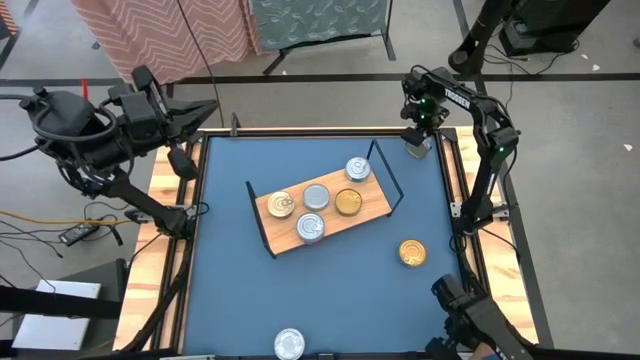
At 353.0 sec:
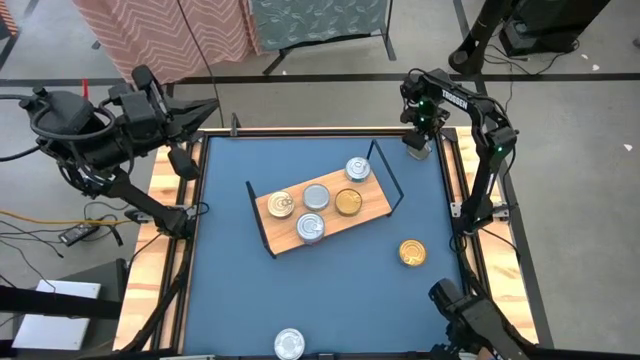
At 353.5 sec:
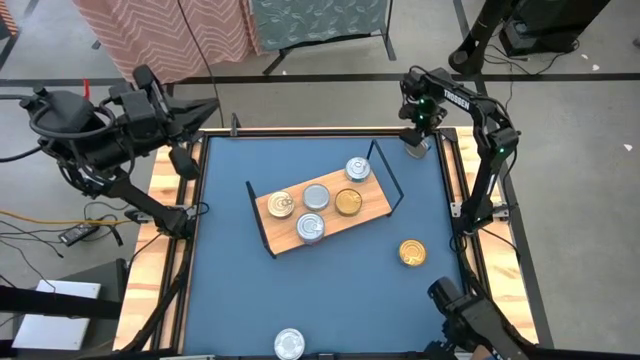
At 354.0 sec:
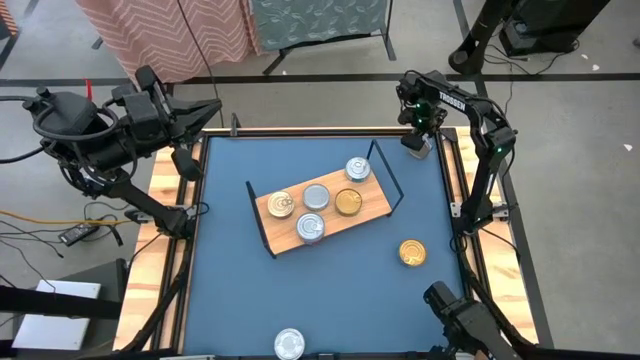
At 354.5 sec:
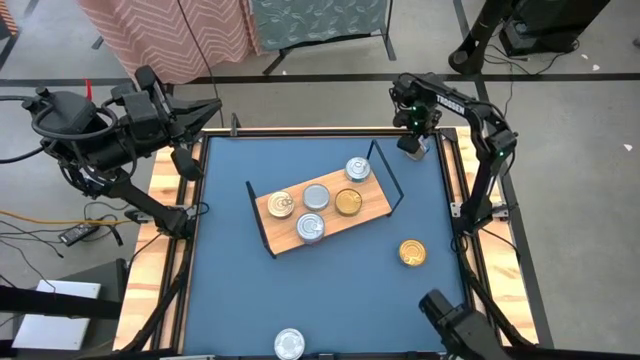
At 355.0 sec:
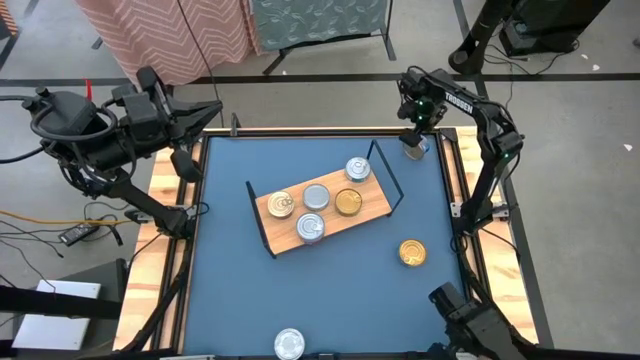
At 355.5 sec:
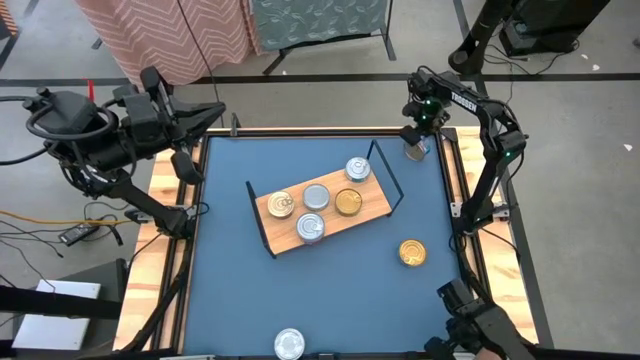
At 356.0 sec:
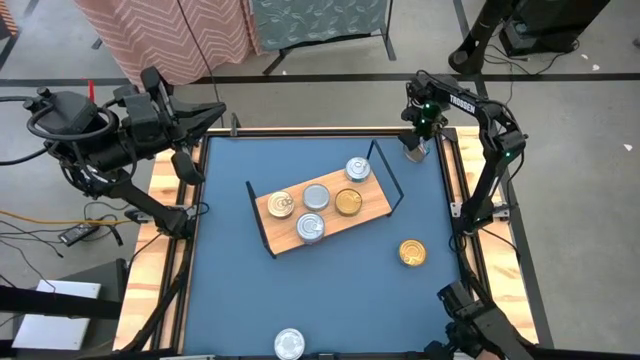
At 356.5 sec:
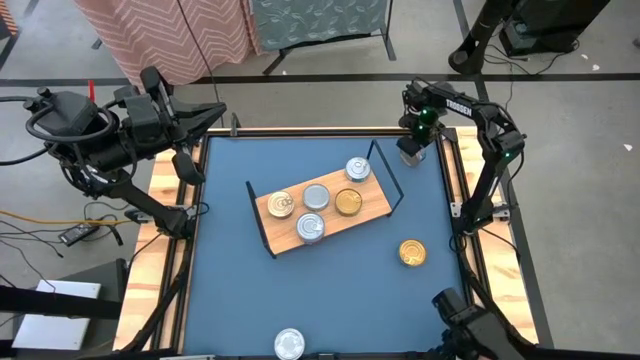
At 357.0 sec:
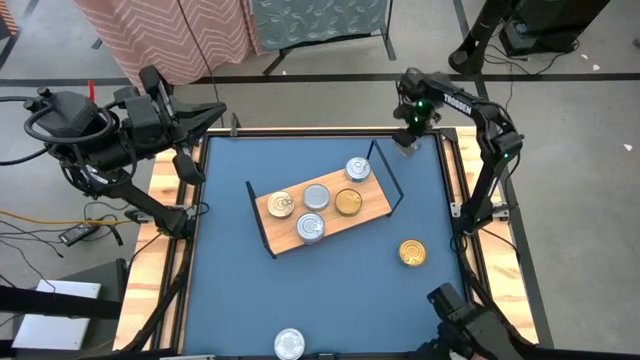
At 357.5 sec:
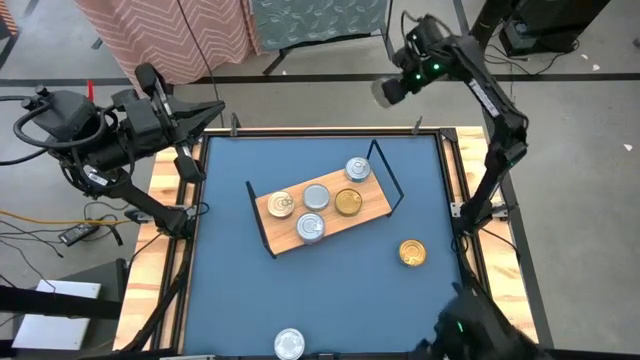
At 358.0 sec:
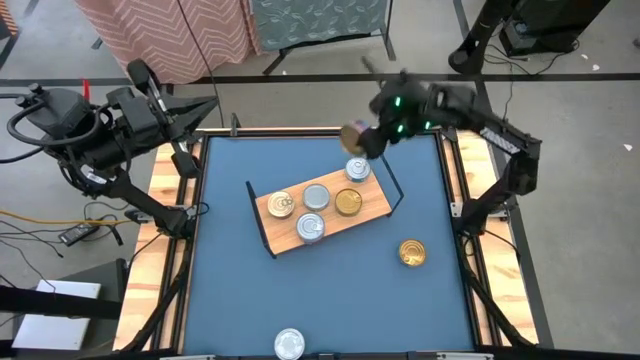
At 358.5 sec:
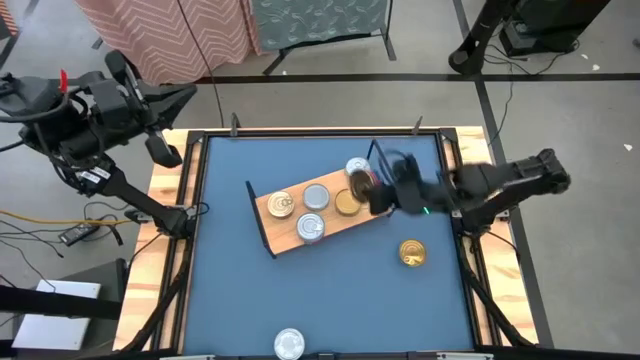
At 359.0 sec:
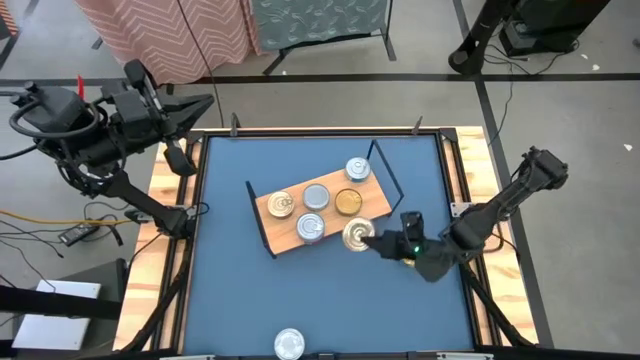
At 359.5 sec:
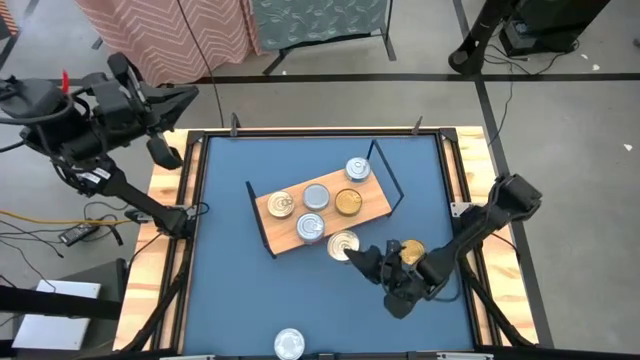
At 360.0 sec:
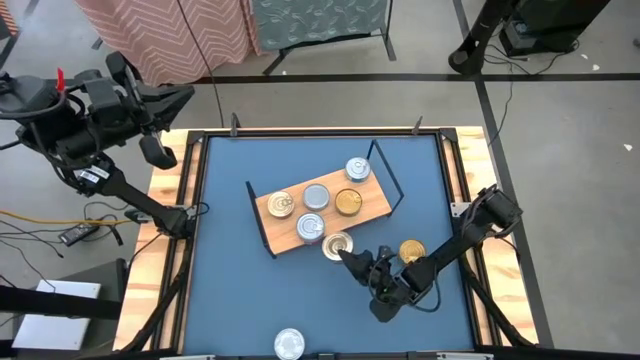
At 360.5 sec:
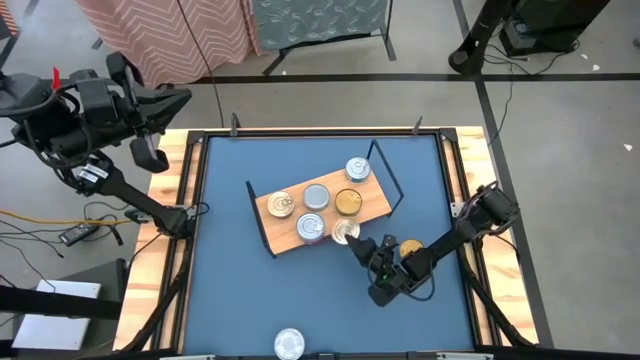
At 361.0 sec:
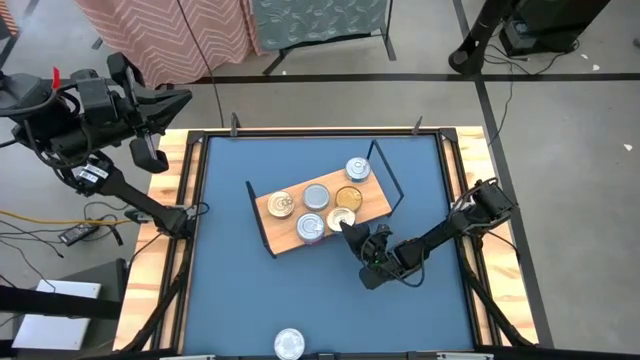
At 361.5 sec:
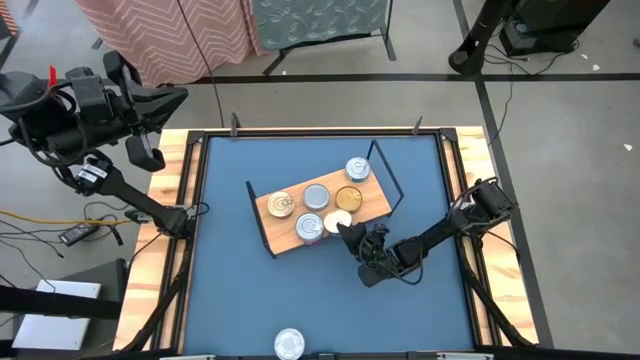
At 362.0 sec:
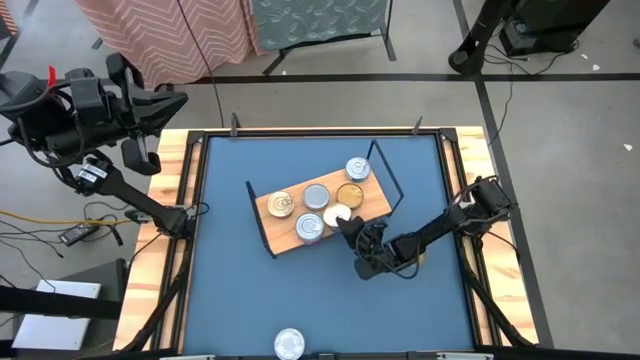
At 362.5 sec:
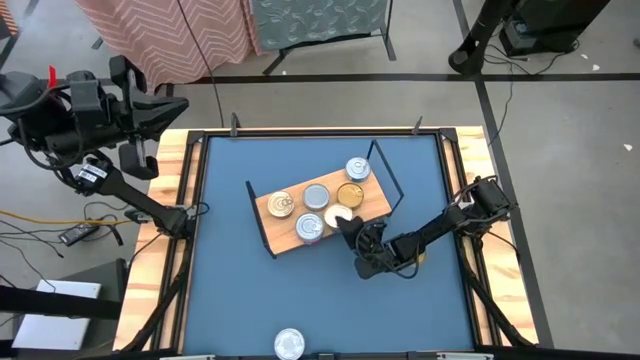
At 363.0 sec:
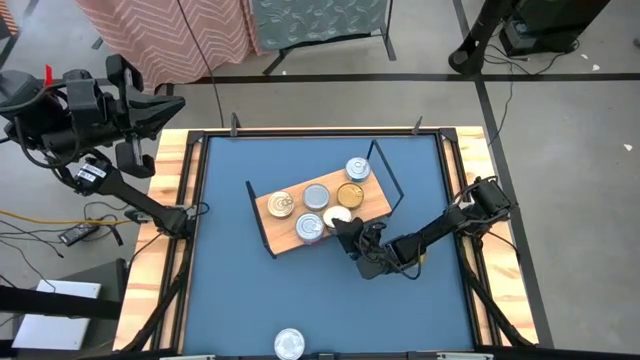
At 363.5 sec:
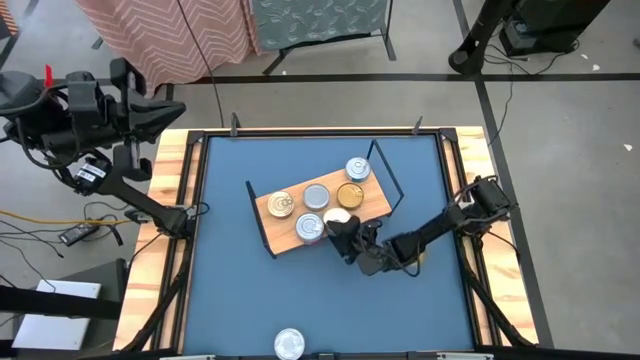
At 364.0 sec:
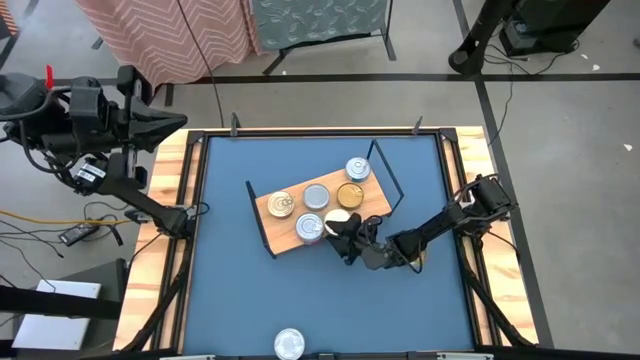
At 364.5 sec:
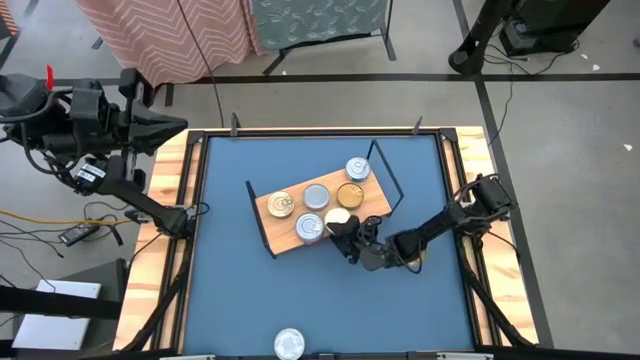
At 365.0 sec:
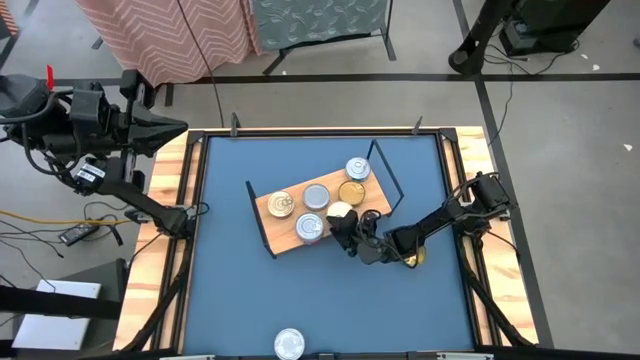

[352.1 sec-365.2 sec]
Task: Stack canned seafood by type on shelf
Put the blue/pink tuna can on the shelf

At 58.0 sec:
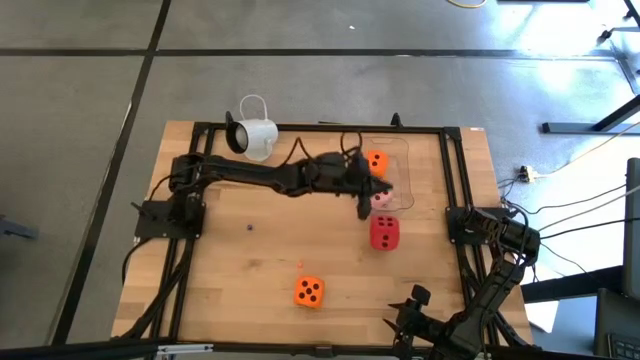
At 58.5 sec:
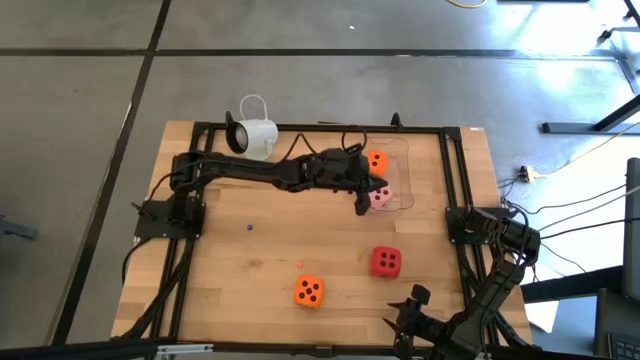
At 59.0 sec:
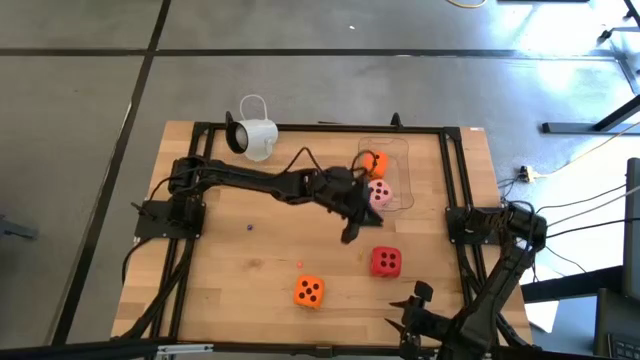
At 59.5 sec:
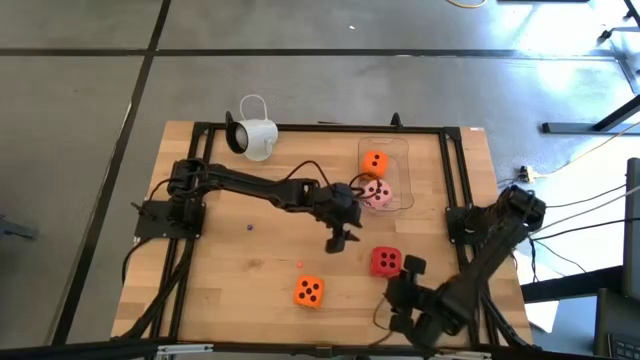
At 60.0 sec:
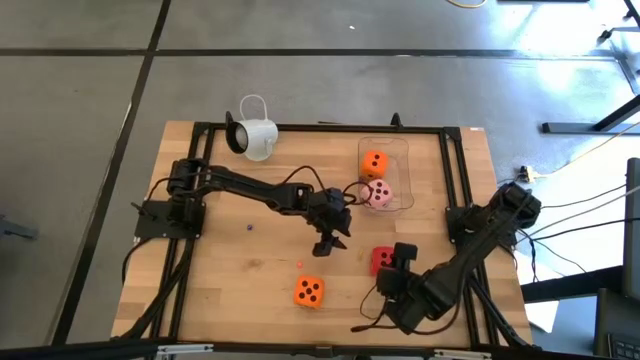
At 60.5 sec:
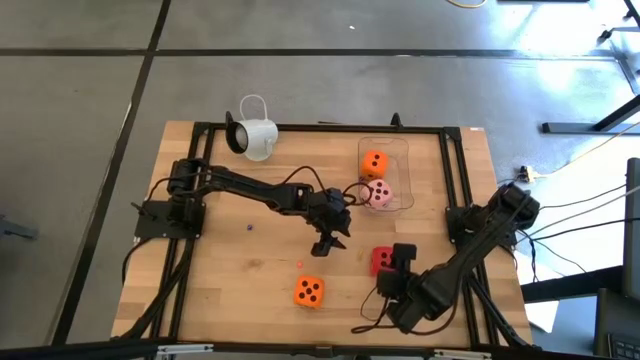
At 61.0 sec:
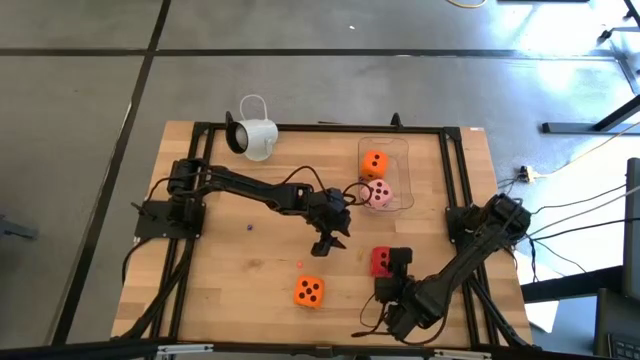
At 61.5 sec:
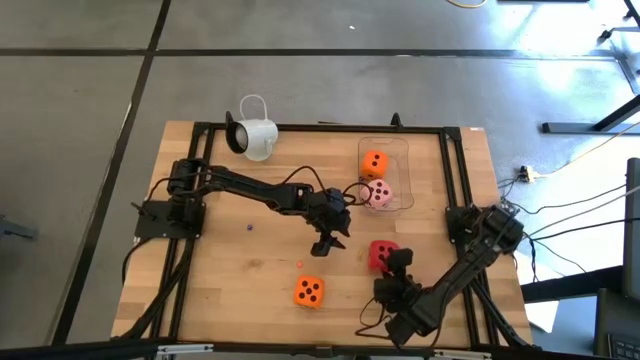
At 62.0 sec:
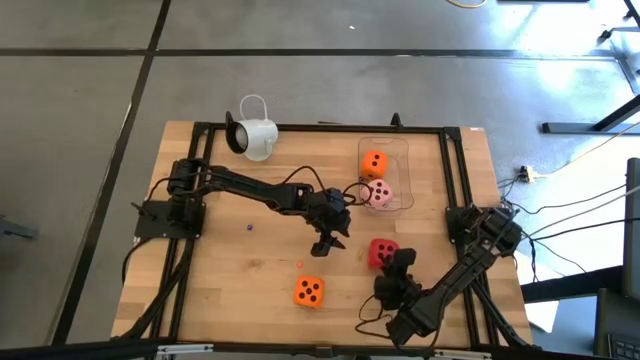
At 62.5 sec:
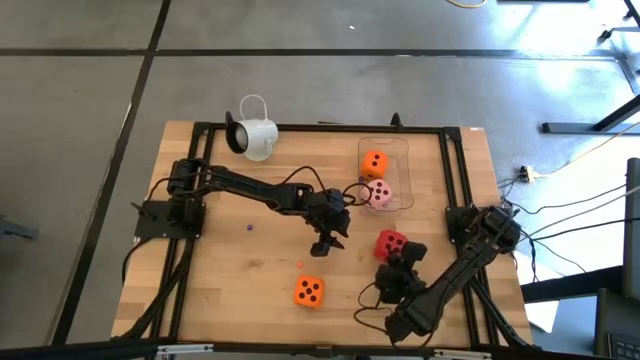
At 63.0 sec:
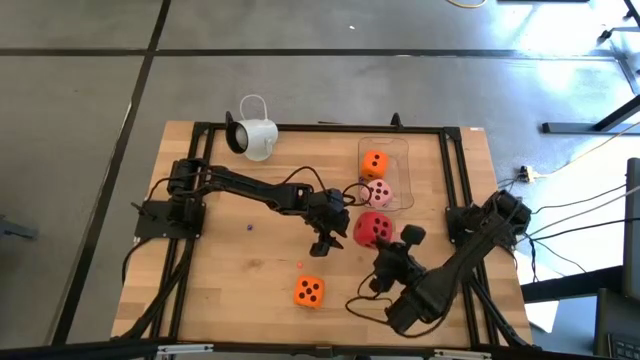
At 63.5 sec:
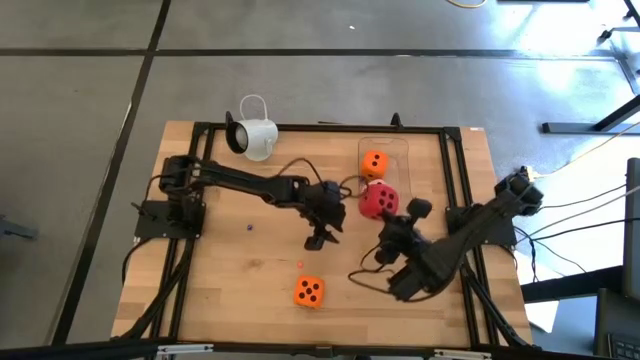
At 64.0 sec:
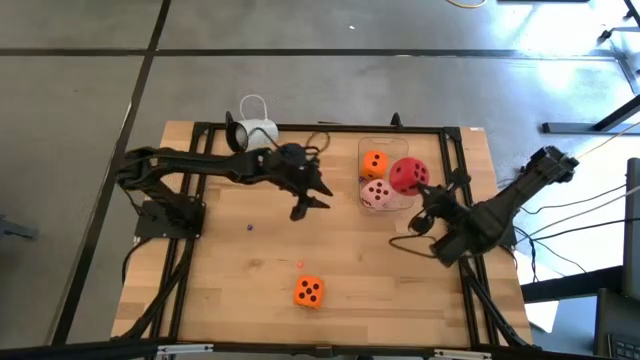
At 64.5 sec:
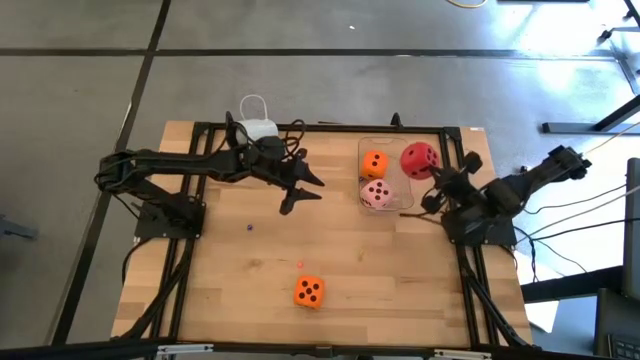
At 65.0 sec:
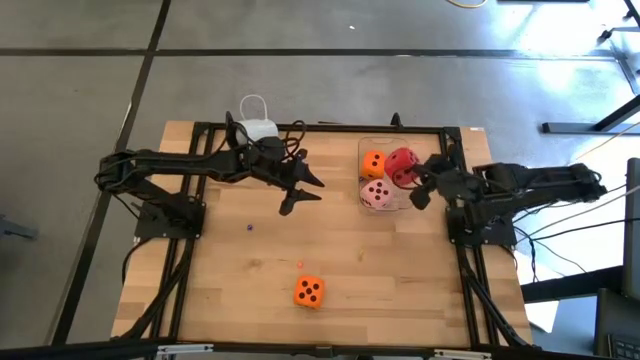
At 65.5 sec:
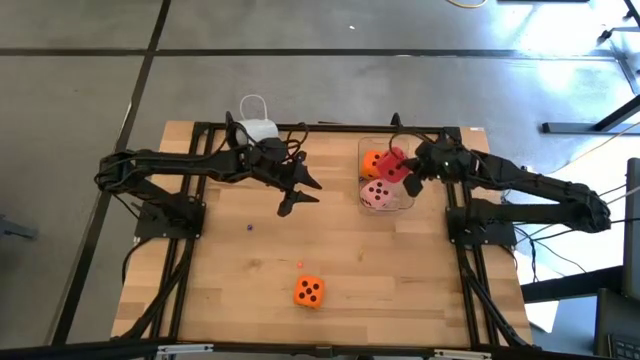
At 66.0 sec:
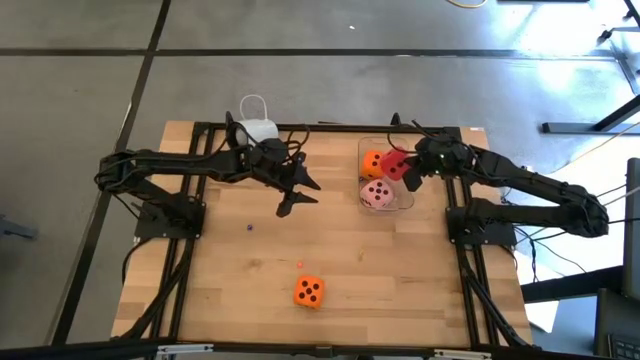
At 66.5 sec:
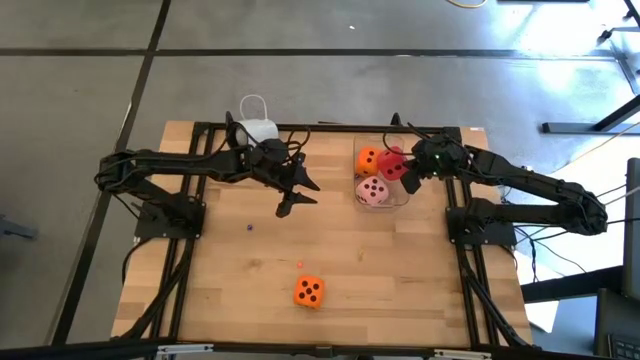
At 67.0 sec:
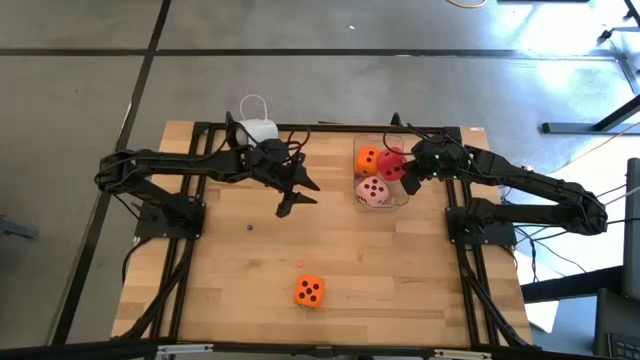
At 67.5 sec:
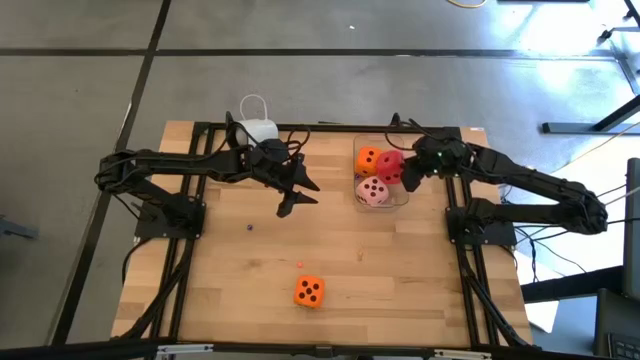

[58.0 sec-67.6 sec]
Task: Pick & Place Dice
Put the large red die into the transparent bin
